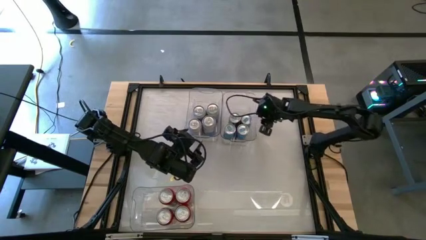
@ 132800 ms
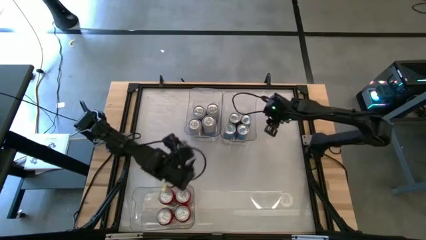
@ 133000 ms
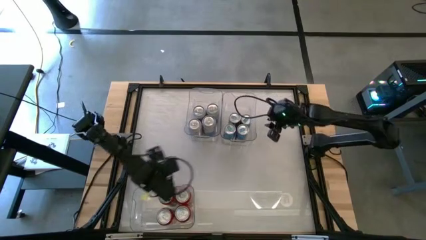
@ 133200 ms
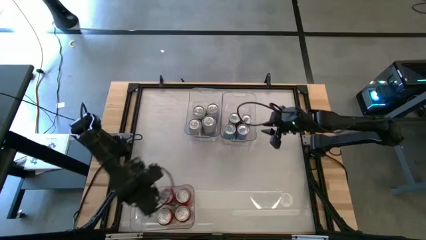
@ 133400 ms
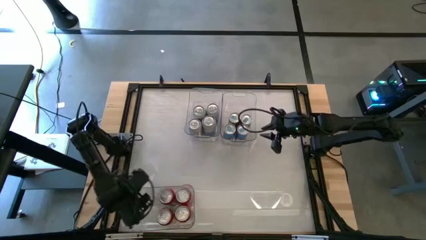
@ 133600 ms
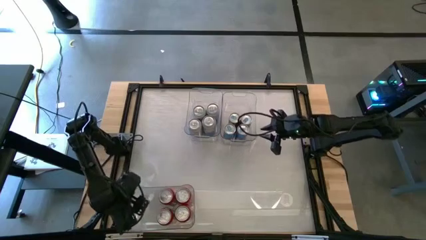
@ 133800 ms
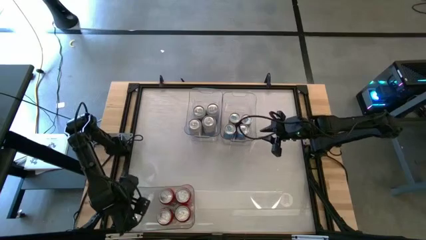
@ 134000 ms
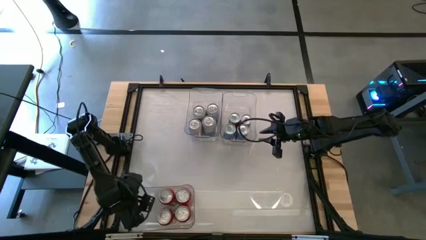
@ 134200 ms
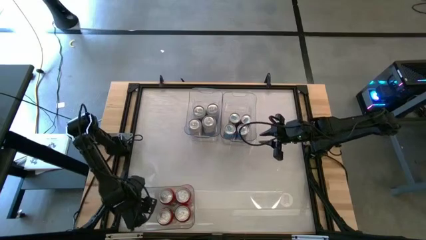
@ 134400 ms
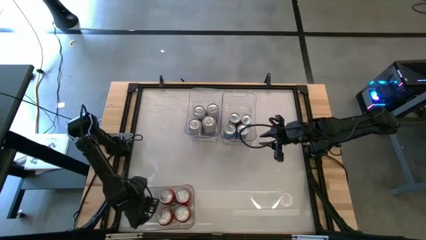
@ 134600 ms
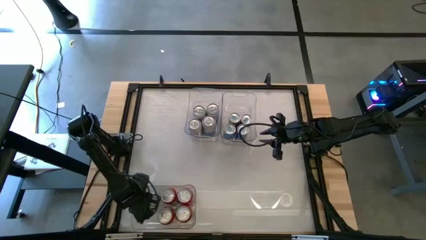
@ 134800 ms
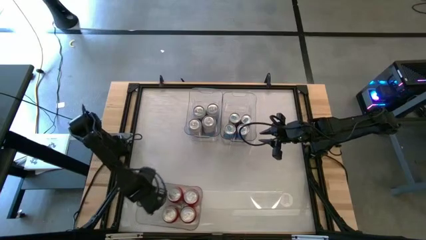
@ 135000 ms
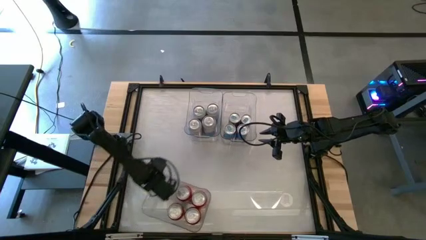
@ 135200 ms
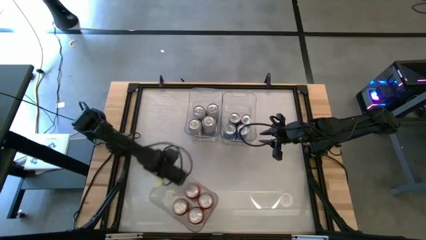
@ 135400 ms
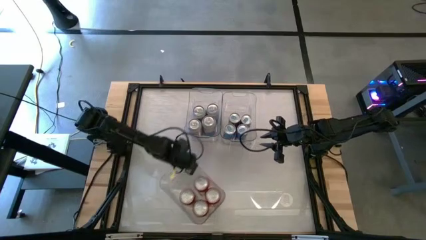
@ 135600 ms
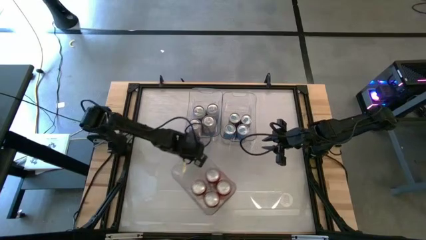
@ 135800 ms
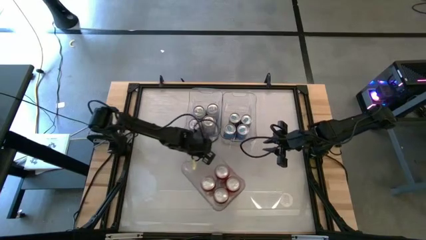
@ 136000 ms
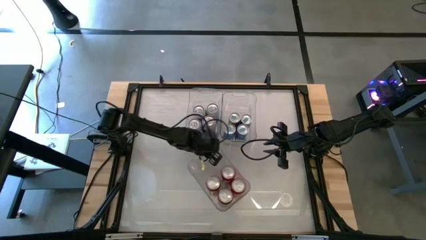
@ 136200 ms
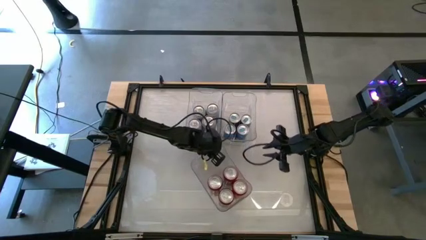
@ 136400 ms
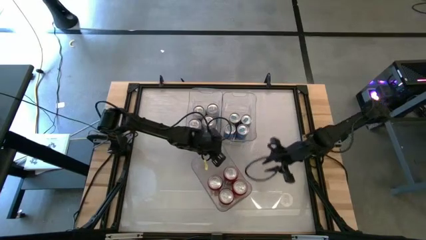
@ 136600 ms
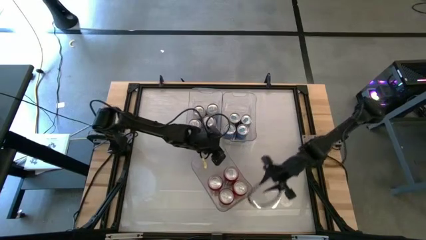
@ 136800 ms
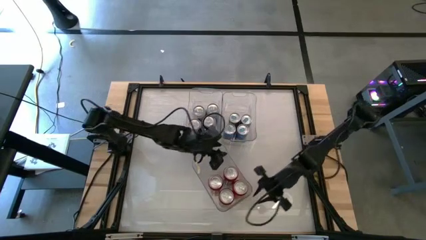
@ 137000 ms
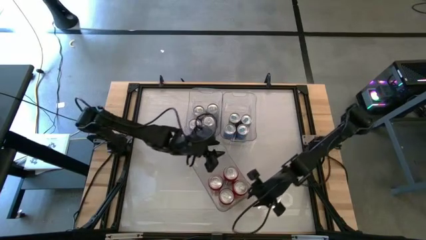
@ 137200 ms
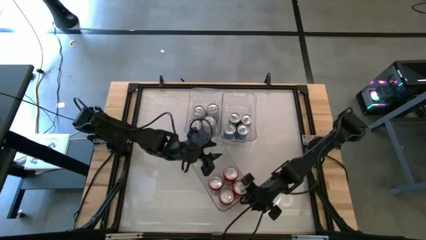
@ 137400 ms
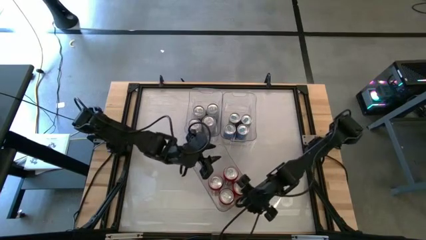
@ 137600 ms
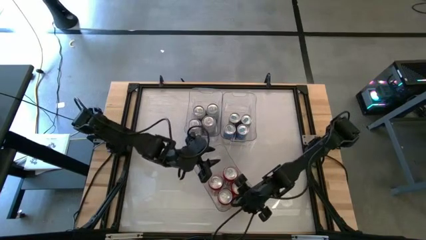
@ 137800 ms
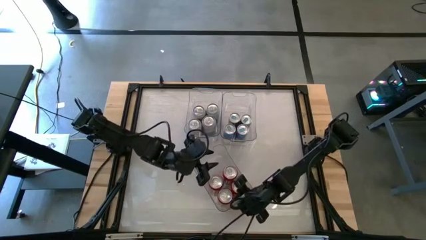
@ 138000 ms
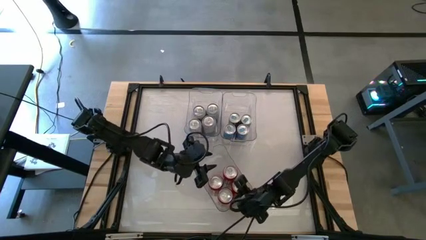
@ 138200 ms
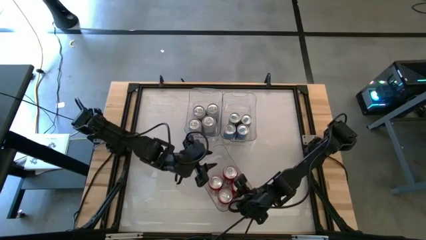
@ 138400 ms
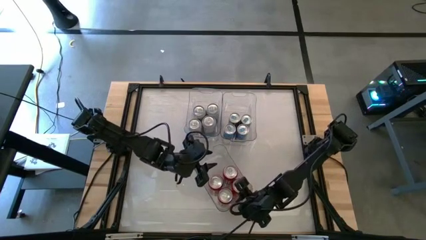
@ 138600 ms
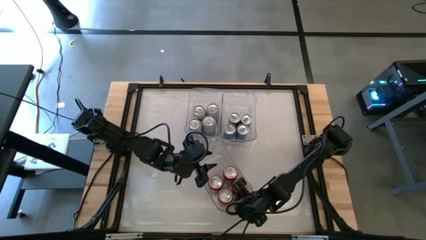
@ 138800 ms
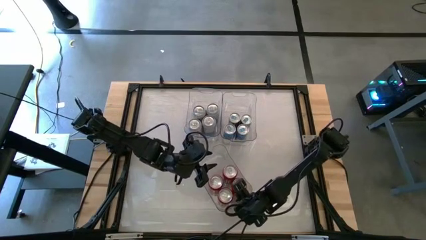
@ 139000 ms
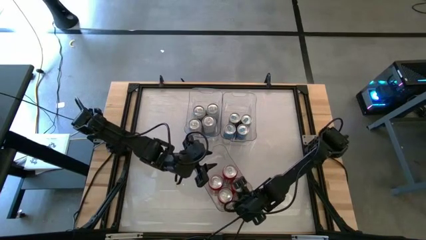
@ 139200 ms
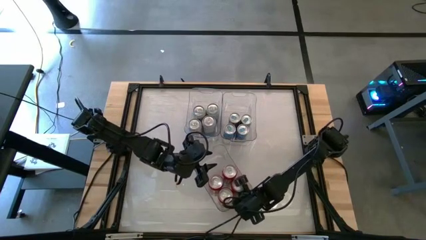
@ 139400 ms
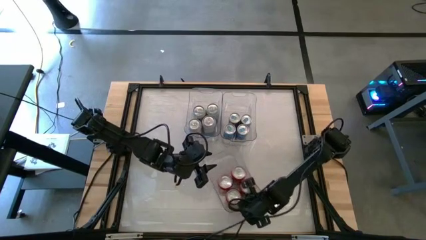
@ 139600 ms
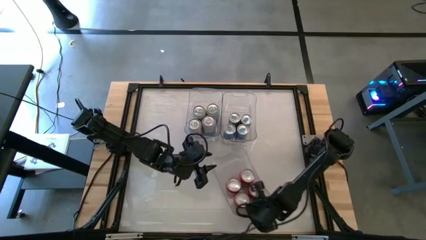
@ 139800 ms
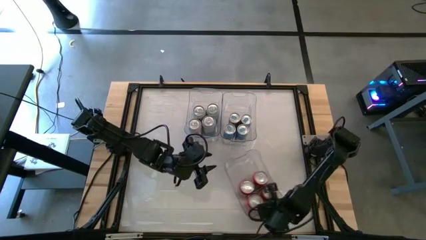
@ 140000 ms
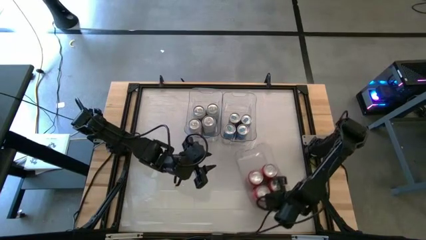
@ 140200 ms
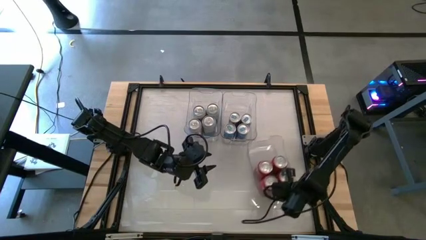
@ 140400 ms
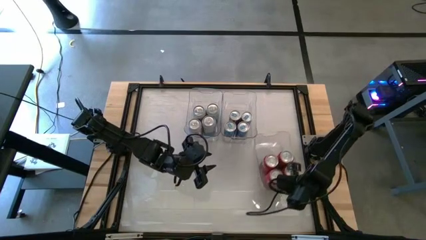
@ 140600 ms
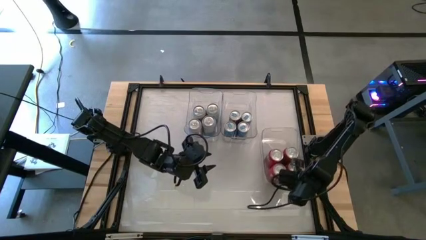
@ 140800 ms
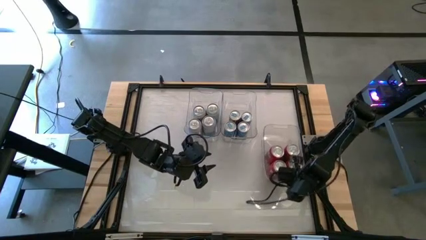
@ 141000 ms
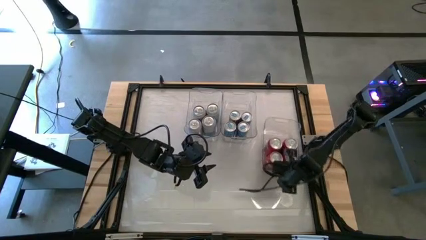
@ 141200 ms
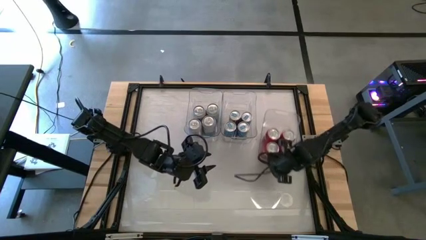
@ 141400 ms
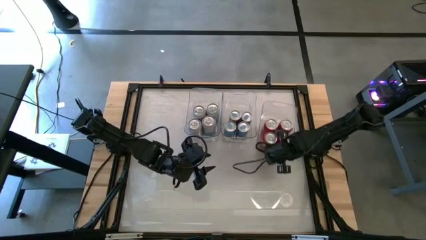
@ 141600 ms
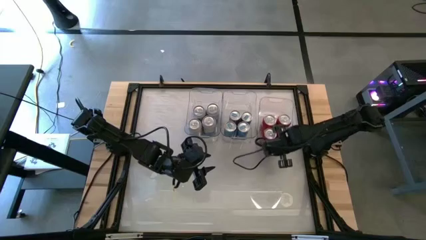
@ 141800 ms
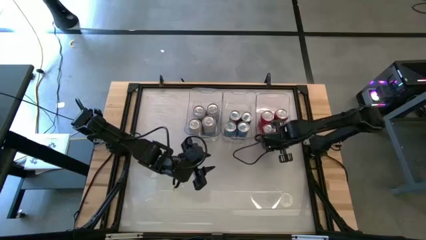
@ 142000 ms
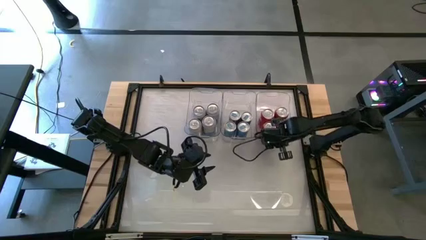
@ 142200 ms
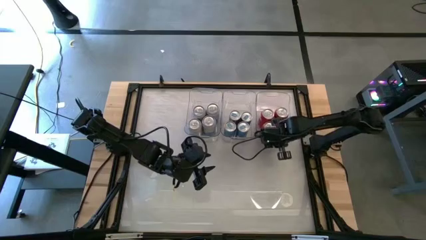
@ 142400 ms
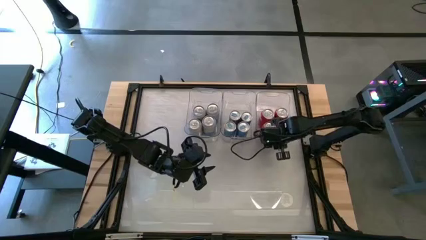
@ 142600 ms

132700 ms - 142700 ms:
Task: Sort soda cans
Move the bottom transparent bin to the top right of the table

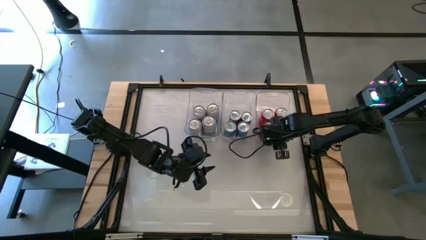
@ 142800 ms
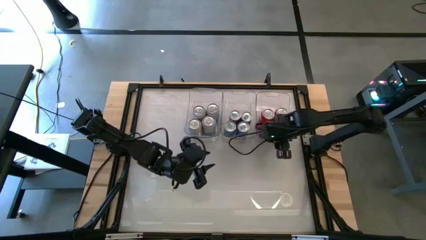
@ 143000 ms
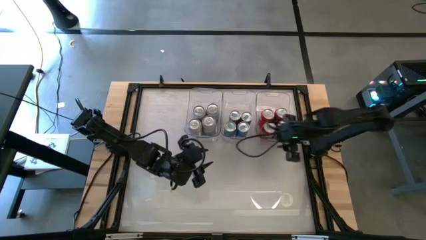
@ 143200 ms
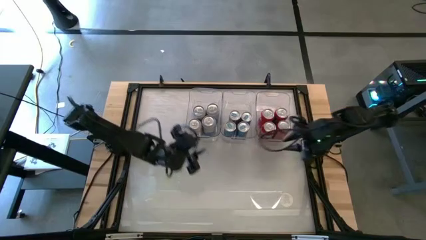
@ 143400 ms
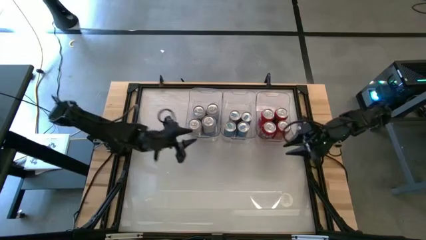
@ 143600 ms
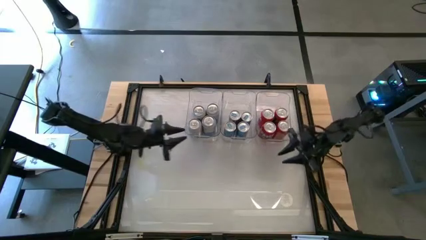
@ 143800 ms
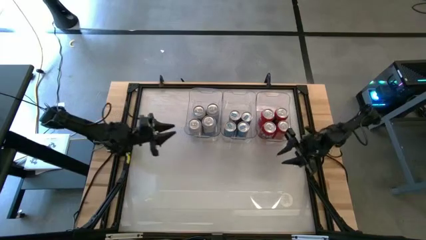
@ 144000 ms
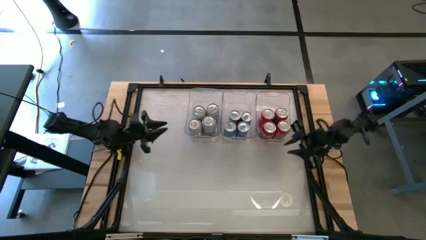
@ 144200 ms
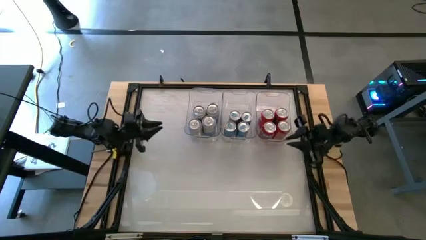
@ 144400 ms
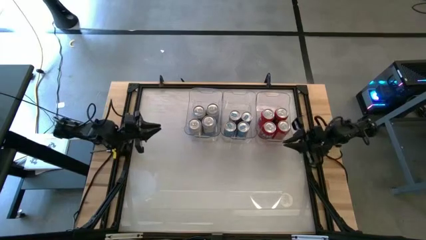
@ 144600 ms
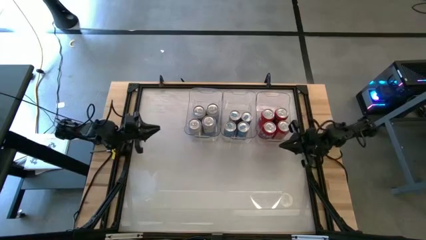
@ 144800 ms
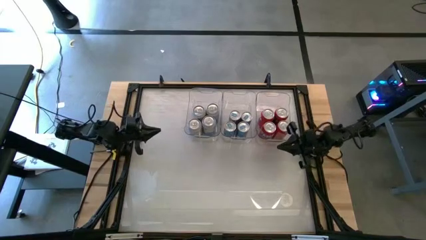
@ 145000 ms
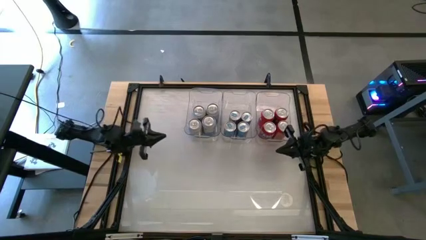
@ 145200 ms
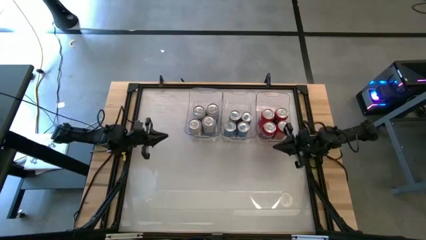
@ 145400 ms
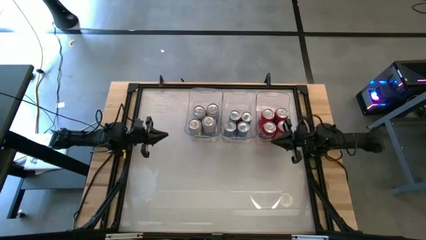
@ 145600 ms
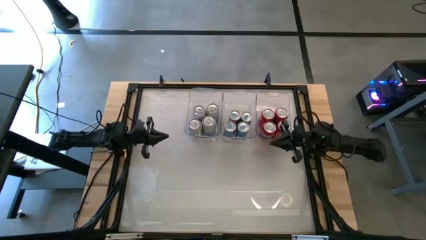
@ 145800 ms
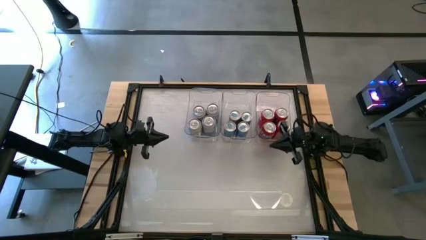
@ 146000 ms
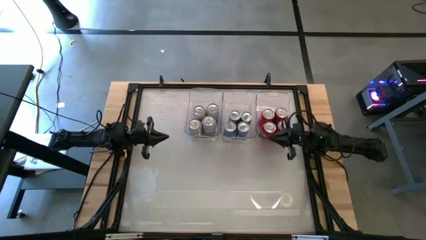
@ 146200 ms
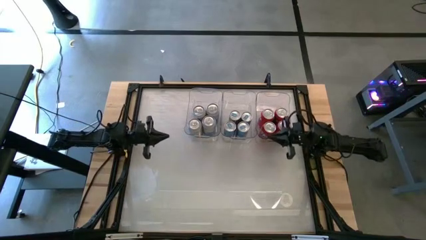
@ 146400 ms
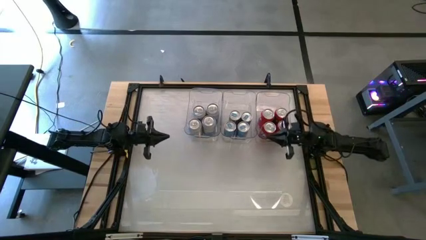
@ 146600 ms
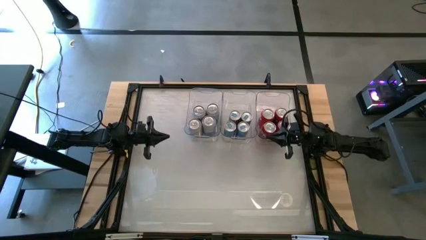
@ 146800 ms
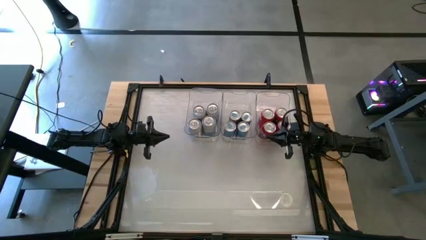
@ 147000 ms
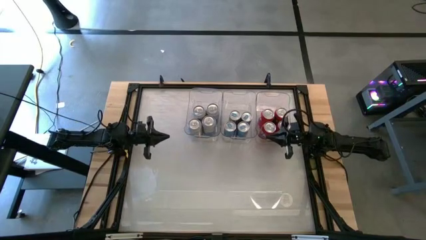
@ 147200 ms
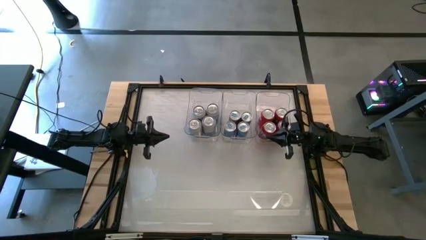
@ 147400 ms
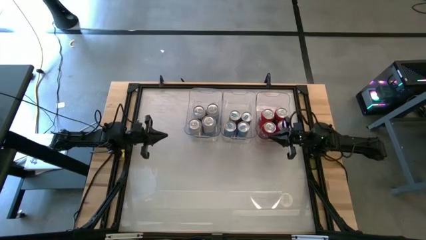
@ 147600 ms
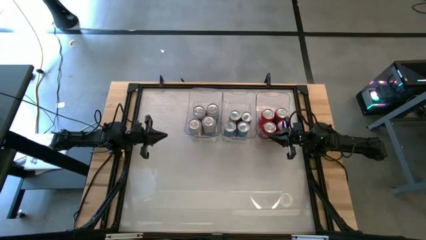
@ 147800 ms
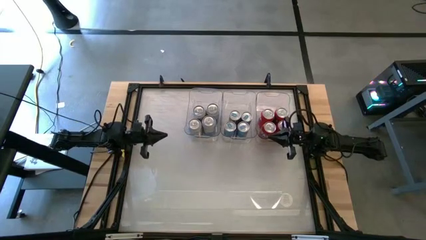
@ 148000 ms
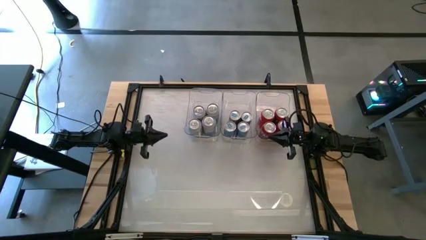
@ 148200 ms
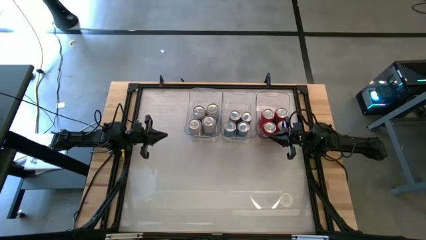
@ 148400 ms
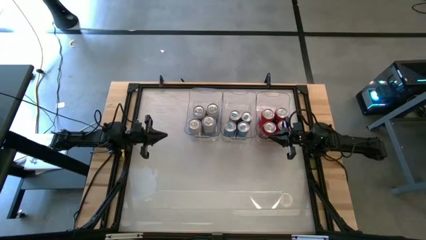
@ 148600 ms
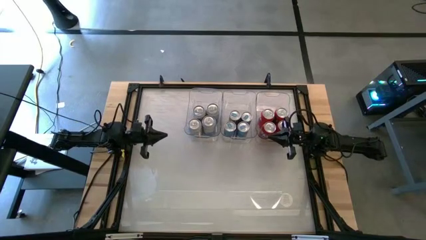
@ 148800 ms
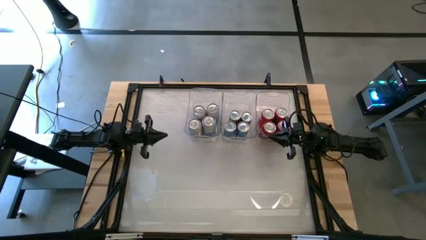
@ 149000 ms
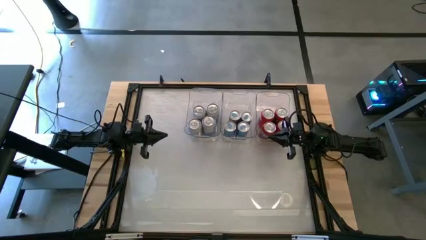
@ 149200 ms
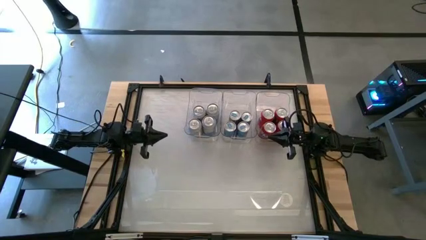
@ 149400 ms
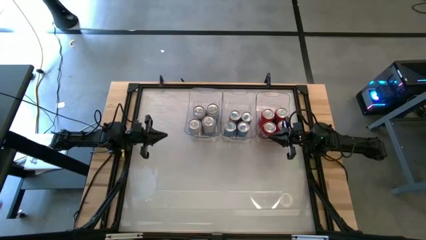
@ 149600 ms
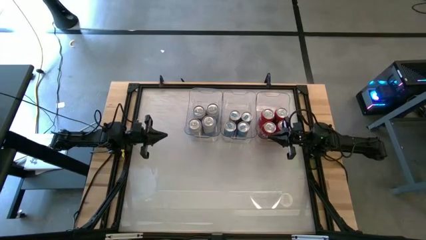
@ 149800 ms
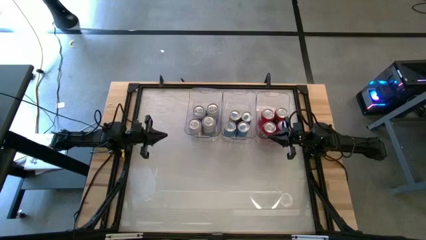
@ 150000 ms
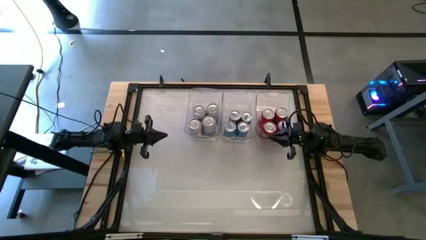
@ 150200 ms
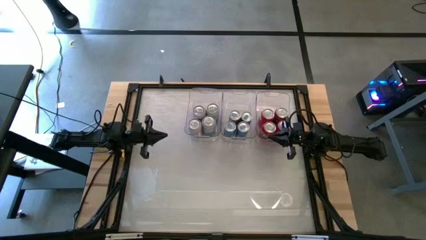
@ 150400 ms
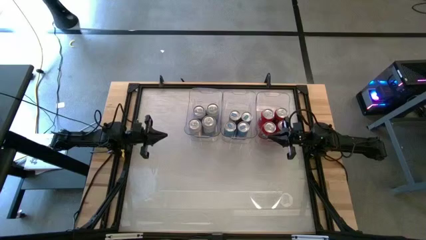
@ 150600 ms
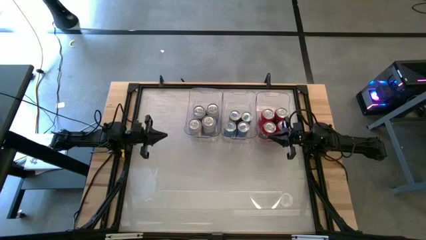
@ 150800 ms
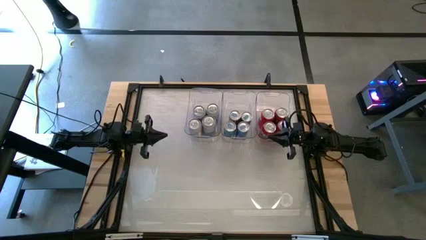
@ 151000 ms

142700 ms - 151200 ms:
Return to Home Position
